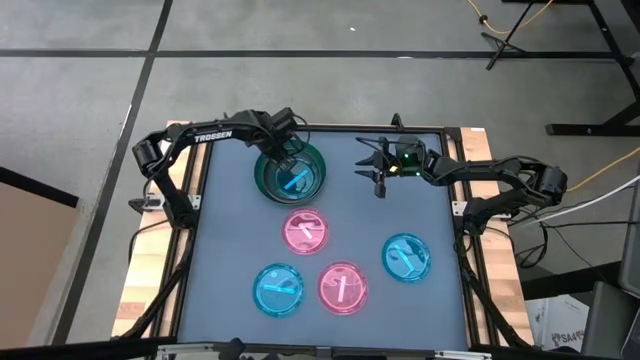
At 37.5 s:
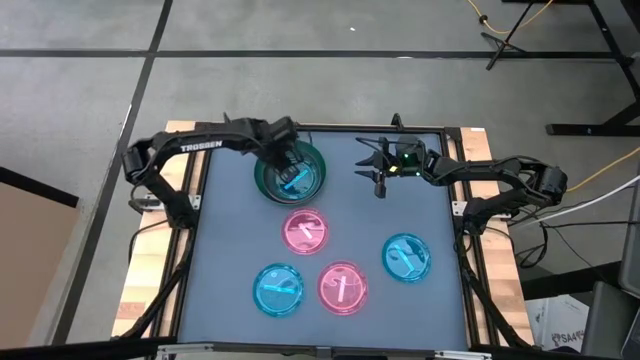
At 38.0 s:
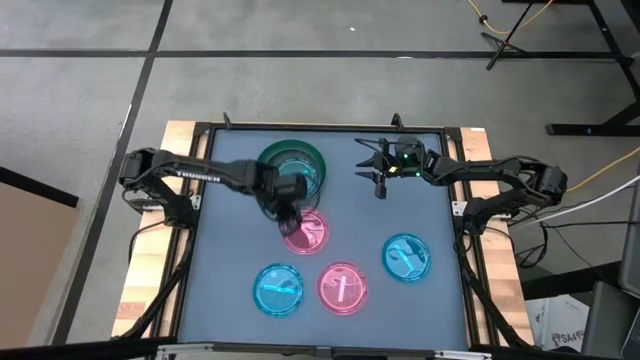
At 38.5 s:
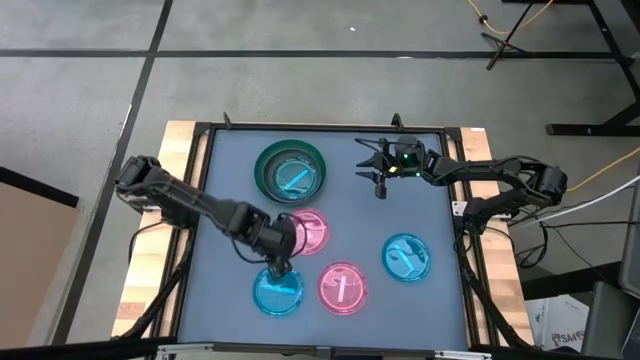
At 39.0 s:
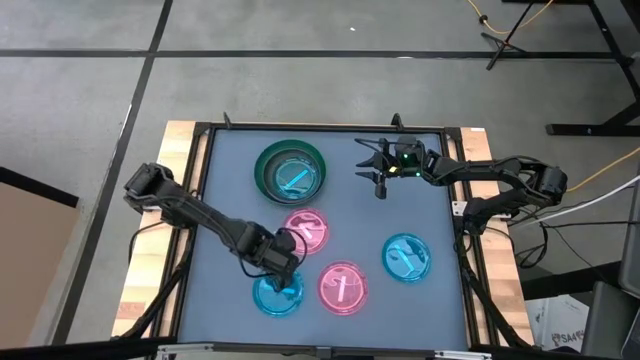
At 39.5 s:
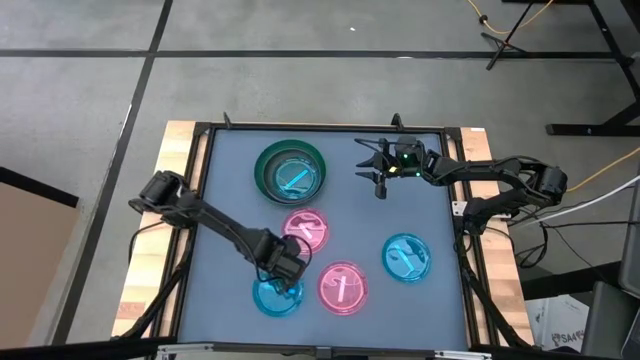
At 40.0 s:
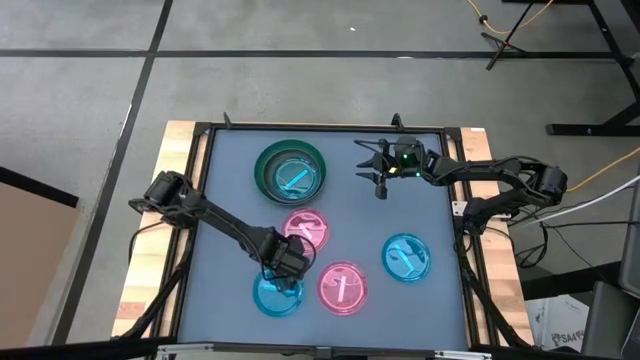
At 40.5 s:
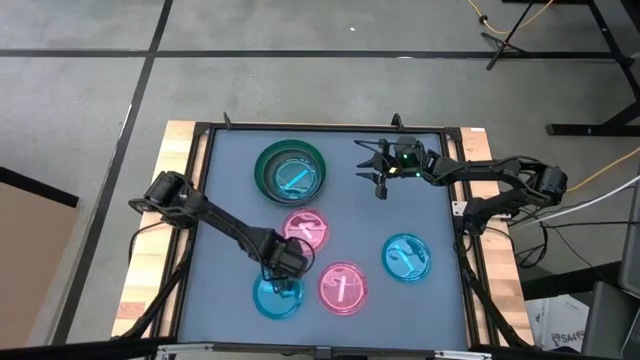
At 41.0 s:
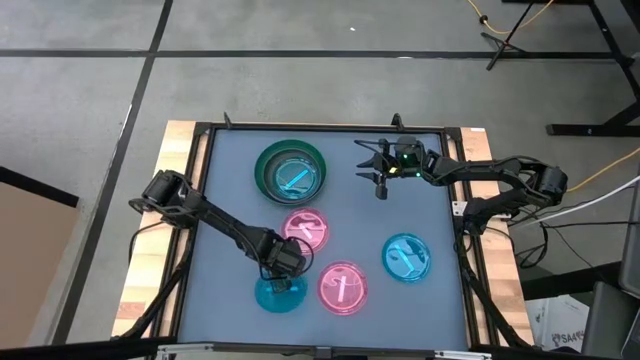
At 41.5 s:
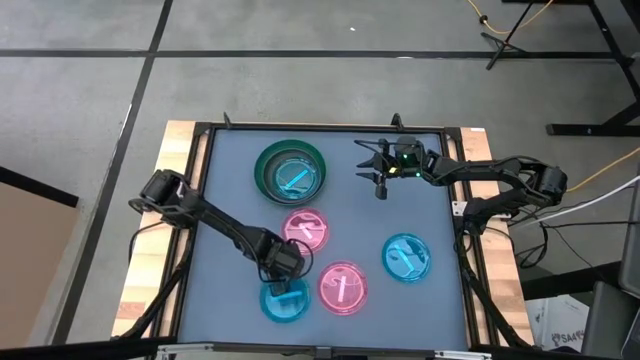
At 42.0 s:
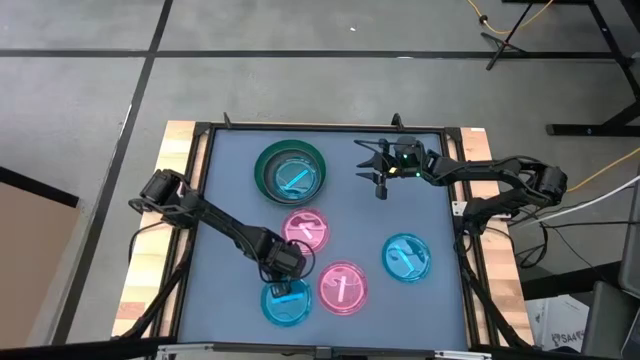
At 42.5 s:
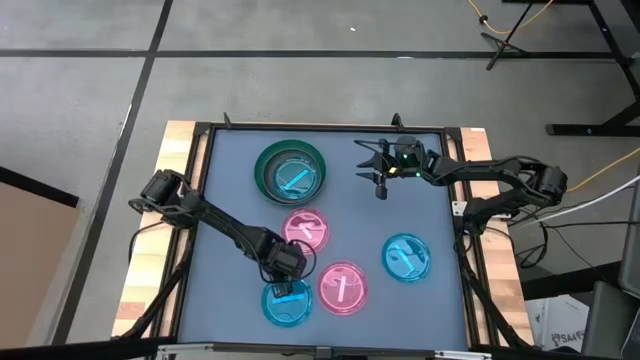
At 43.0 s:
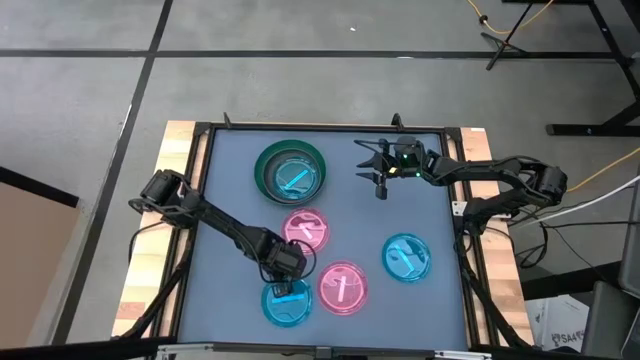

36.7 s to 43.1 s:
Task: Stack plastic plates
Stack the left blue plate on the top blue plate

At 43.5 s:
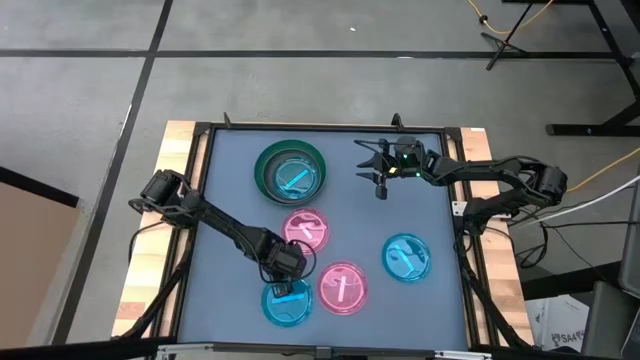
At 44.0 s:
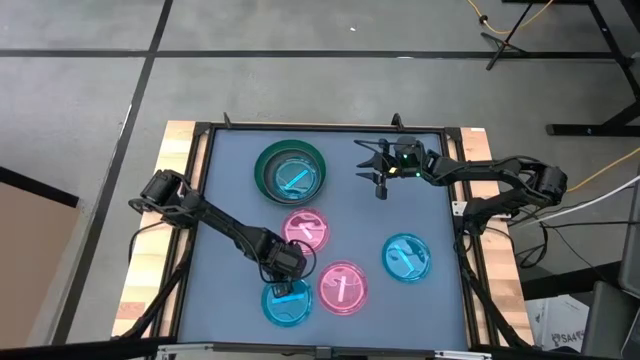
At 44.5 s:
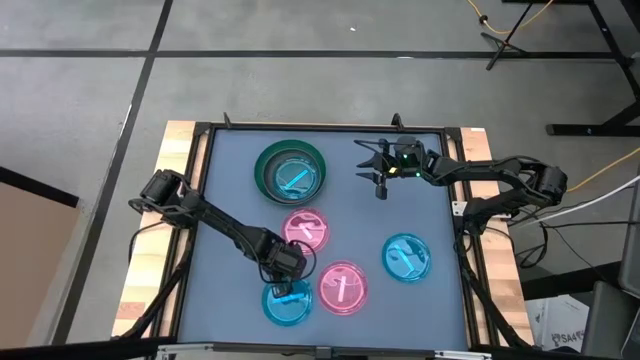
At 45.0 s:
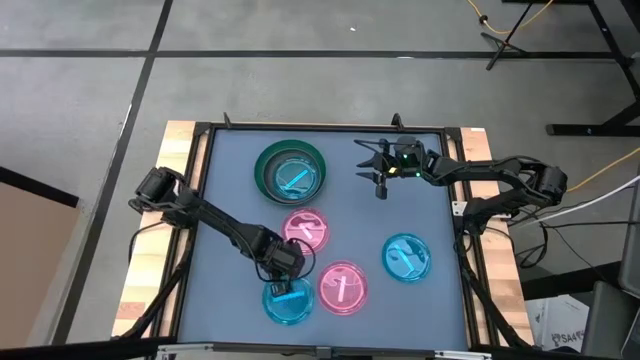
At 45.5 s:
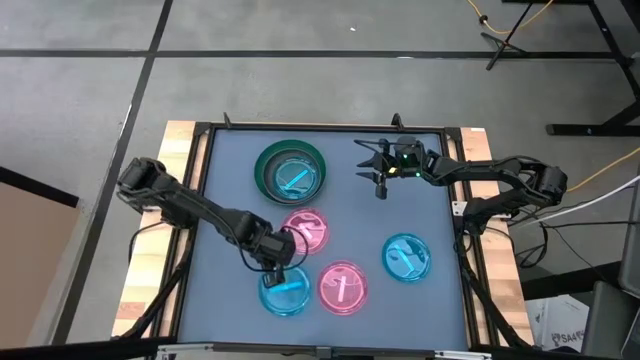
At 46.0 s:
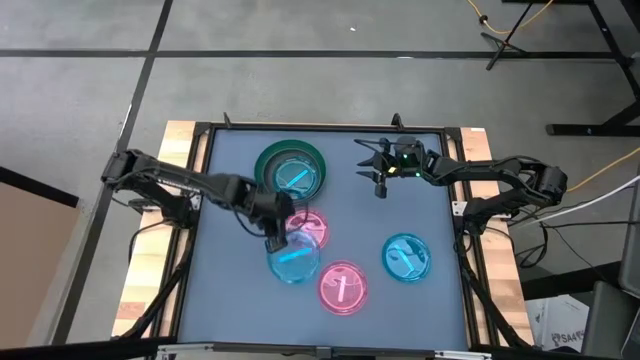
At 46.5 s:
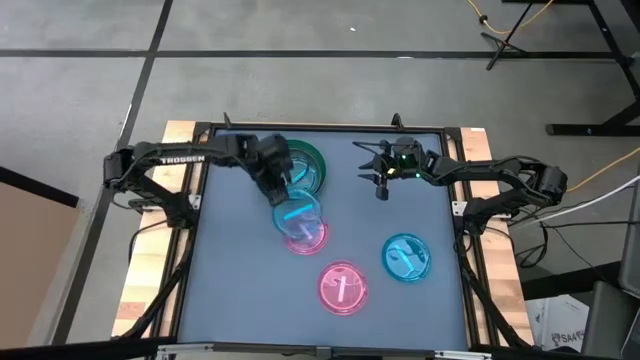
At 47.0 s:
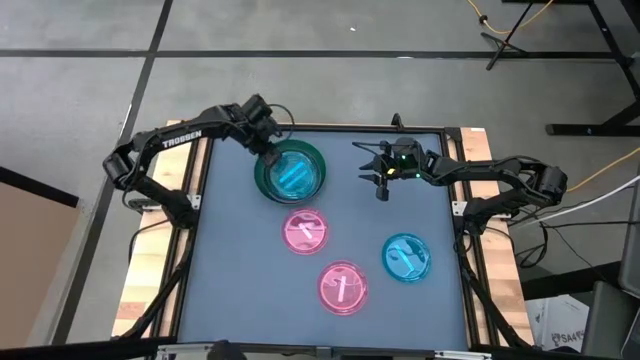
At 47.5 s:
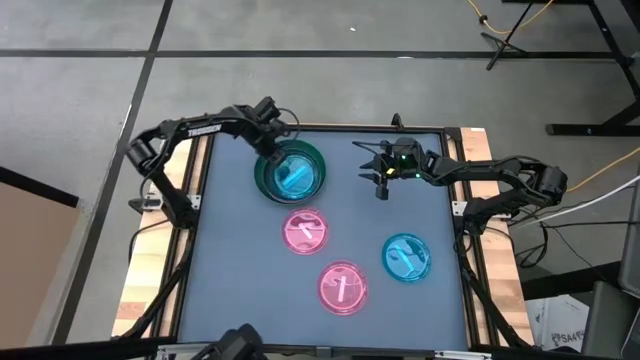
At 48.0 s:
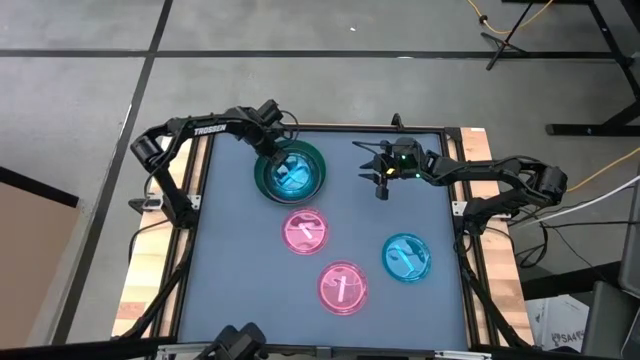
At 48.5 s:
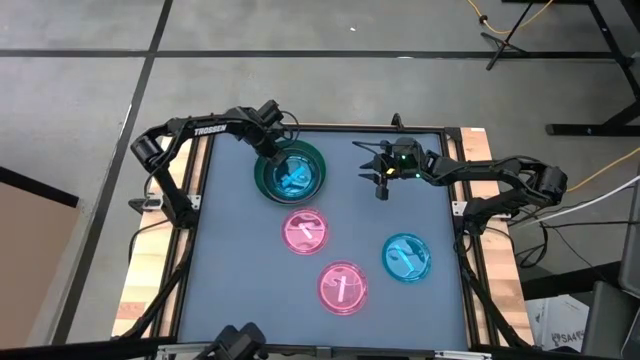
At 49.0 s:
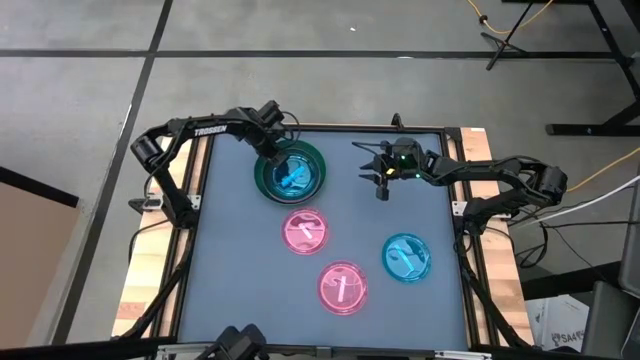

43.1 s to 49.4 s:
Stack the left blue plate on the top blue plate

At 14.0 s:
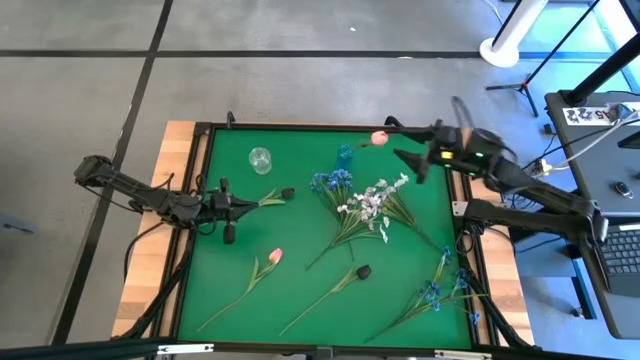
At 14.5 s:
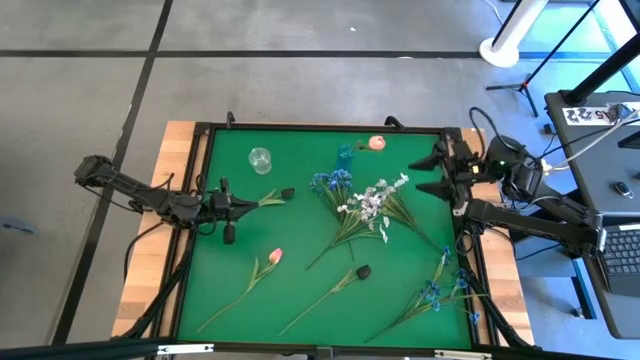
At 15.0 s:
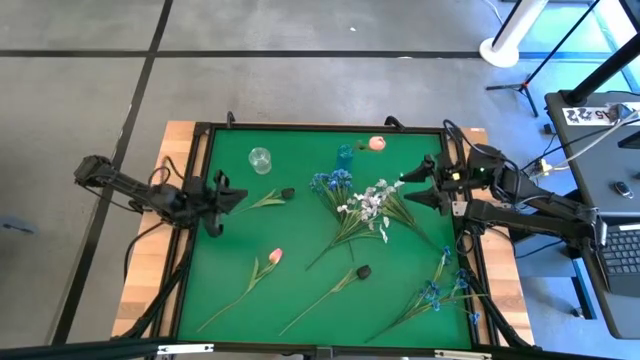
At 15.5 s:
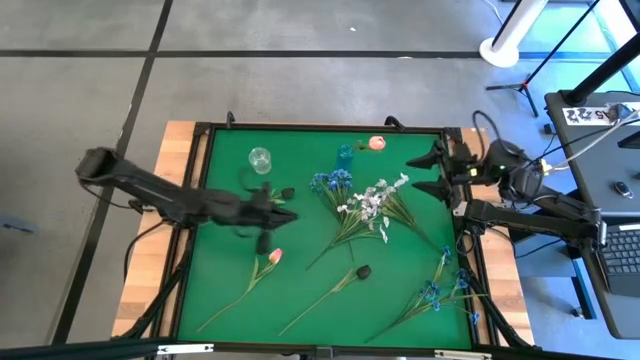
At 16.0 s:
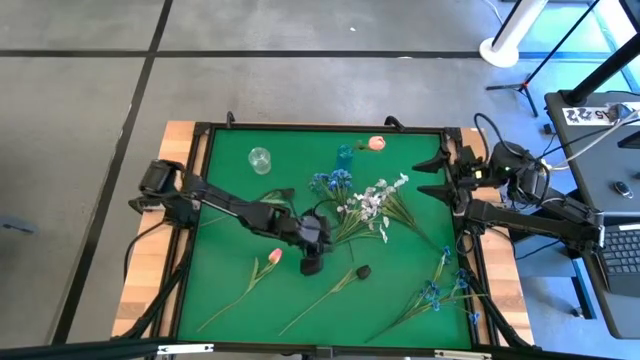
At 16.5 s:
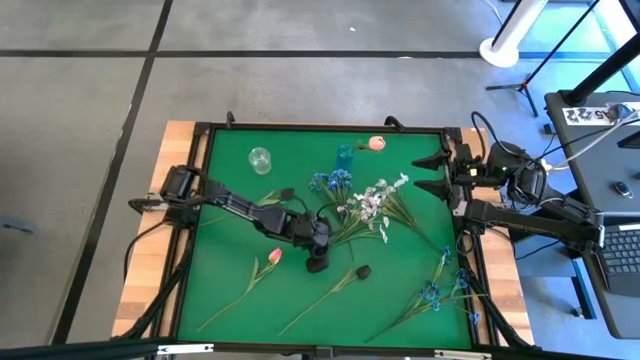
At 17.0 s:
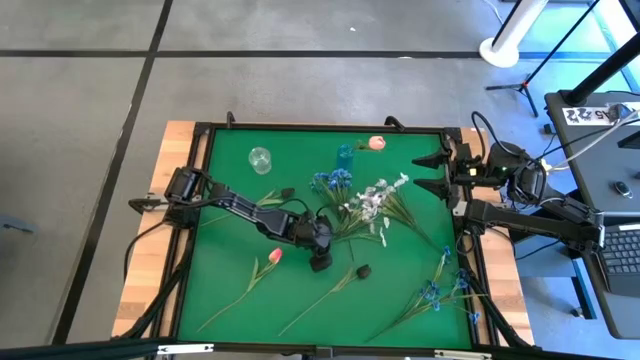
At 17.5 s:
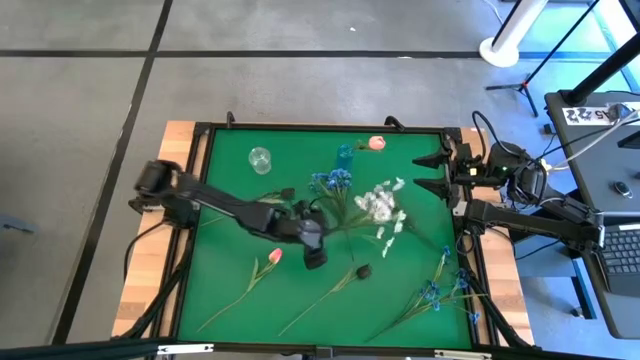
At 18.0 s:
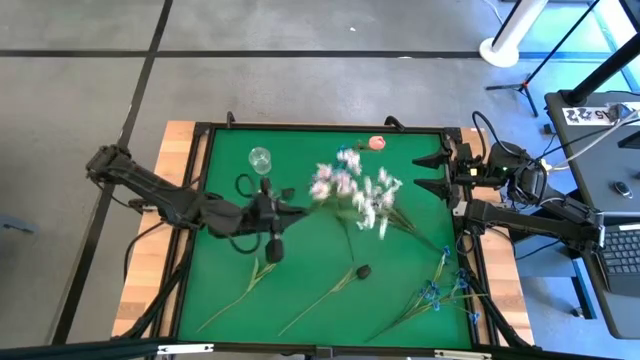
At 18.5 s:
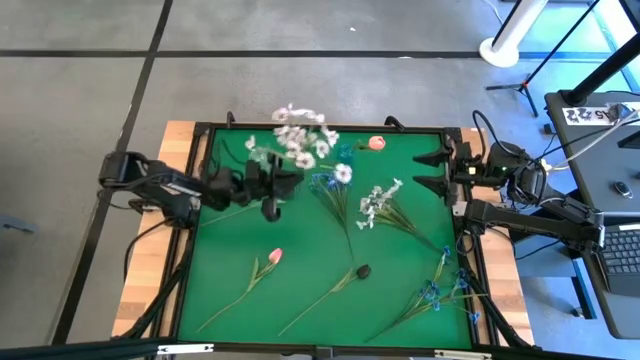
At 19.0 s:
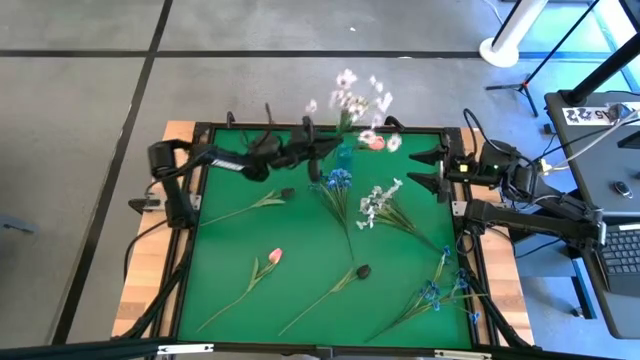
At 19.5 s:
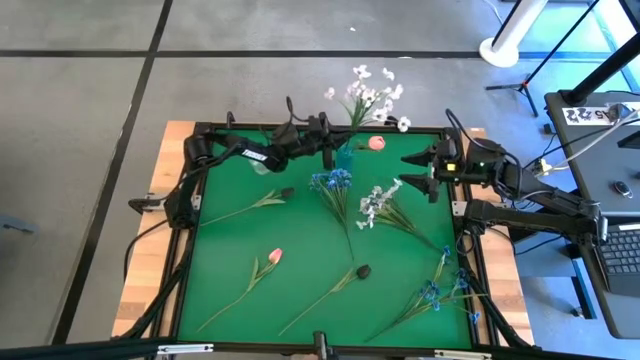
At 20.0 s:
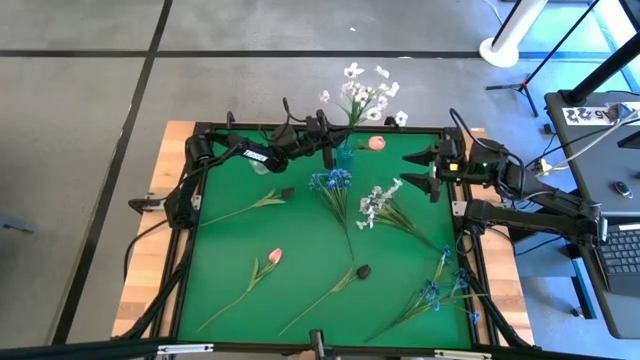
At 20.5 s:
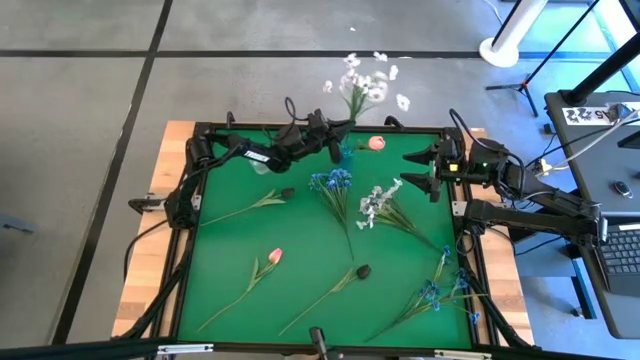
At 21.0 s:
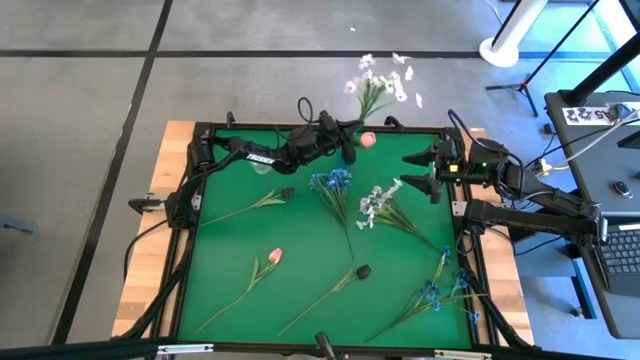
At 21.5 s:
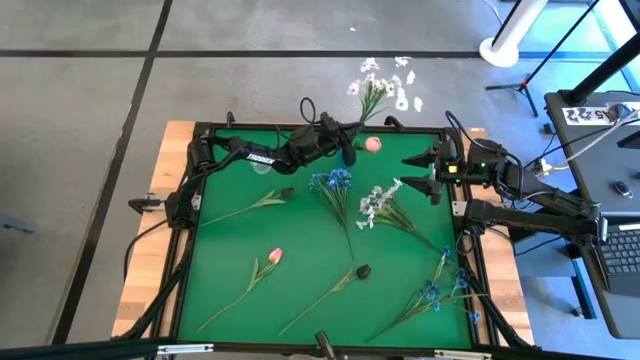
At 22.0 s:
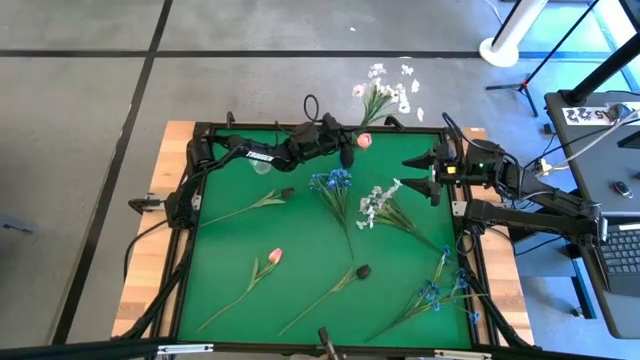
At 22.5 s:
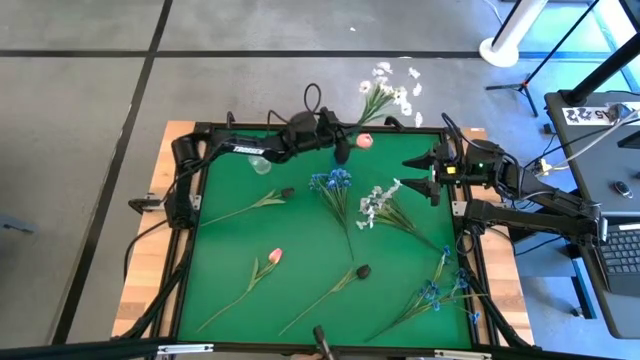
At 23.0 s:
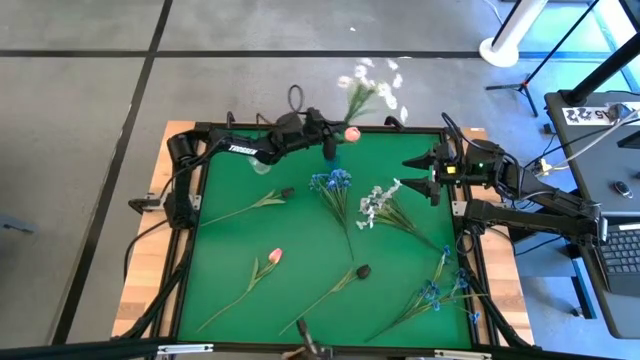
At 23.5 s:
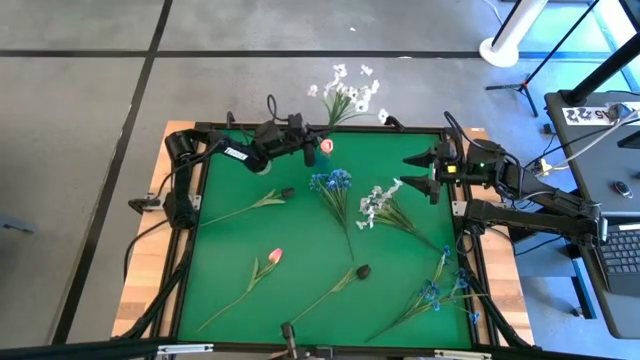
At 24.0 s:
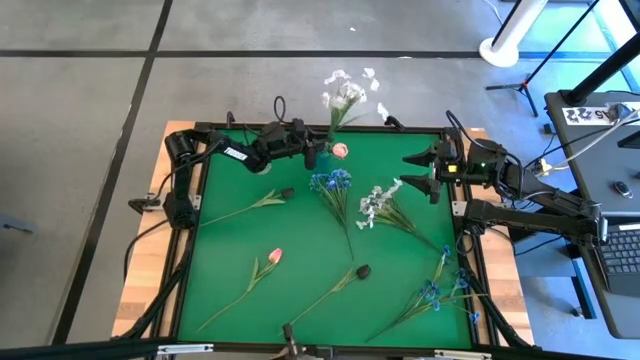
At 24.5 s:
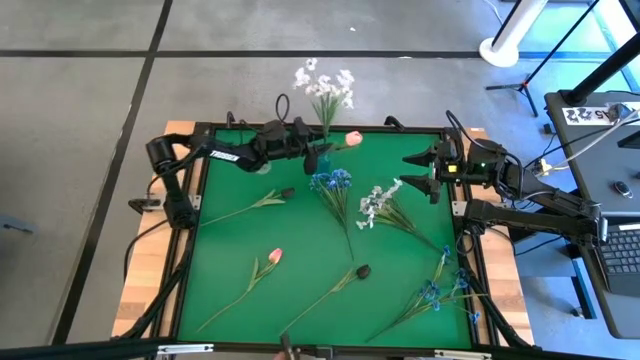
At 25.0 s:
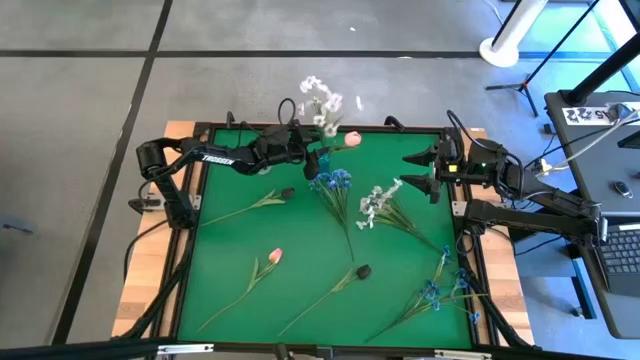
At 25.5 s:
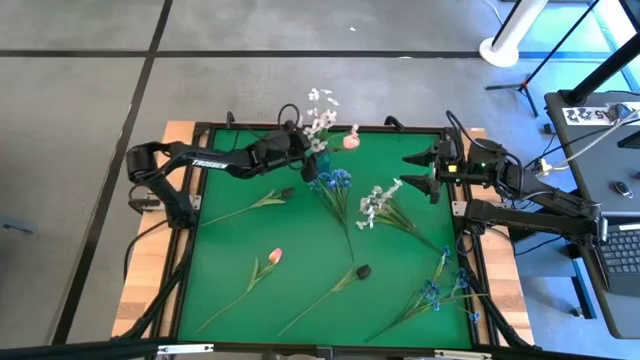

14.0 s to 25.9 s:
Task: Sort flowers into vase by color
Put the left white flowers into the blue vase
